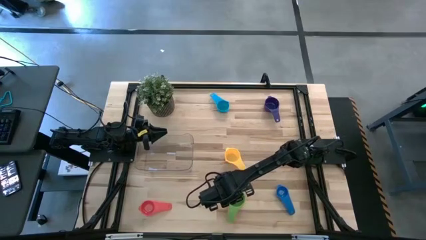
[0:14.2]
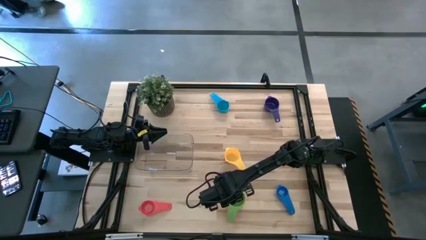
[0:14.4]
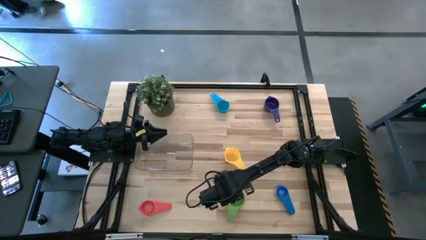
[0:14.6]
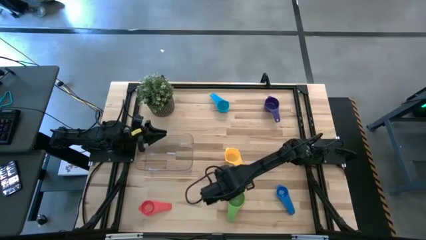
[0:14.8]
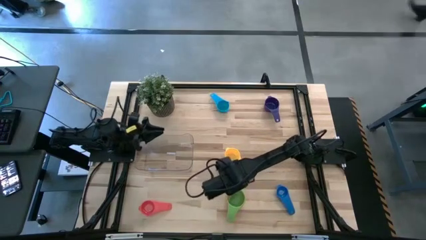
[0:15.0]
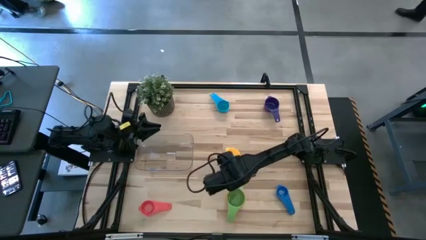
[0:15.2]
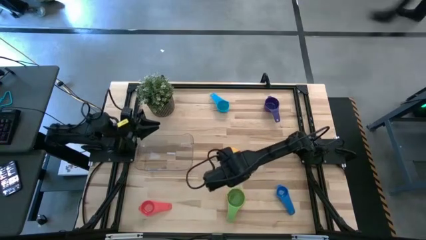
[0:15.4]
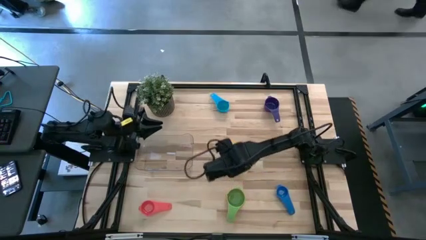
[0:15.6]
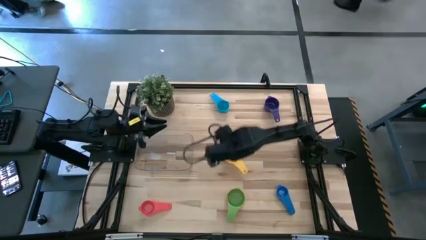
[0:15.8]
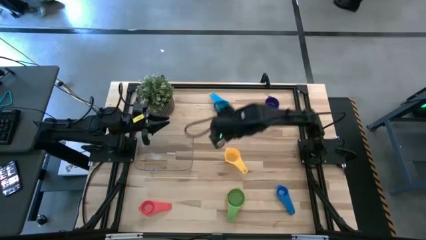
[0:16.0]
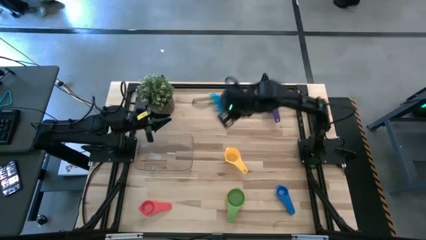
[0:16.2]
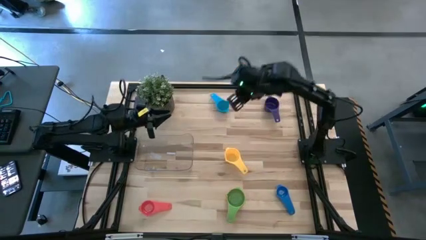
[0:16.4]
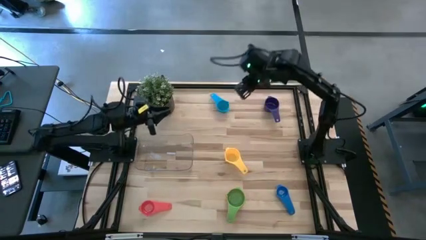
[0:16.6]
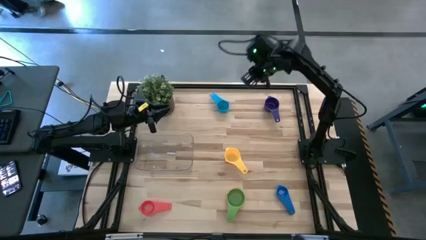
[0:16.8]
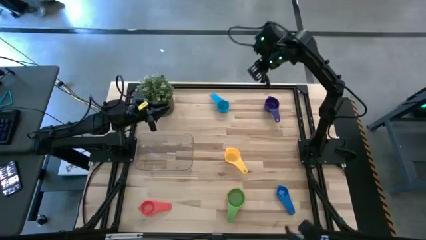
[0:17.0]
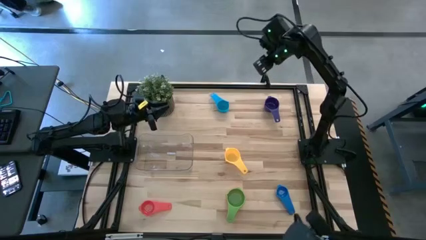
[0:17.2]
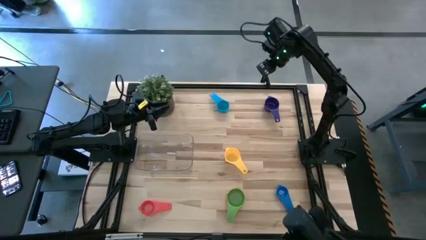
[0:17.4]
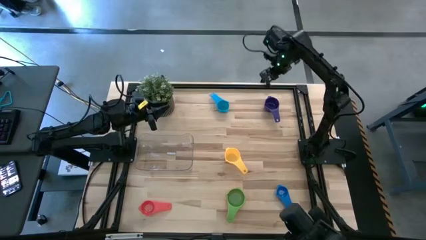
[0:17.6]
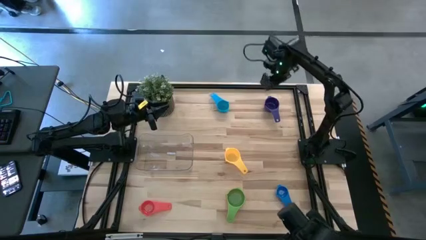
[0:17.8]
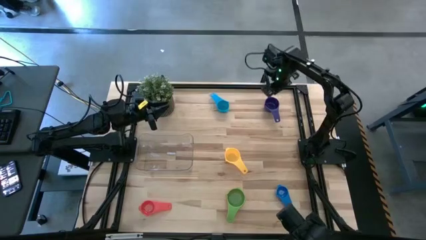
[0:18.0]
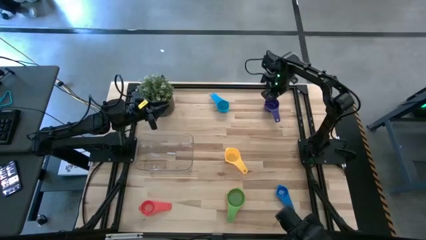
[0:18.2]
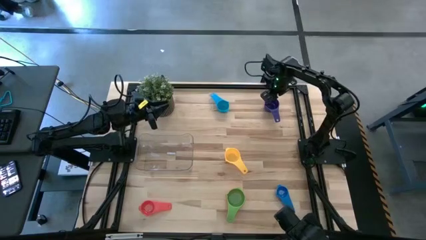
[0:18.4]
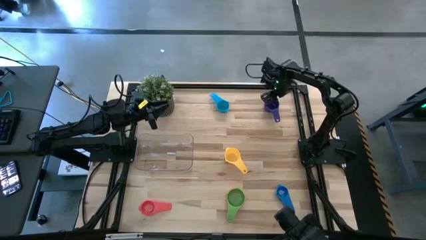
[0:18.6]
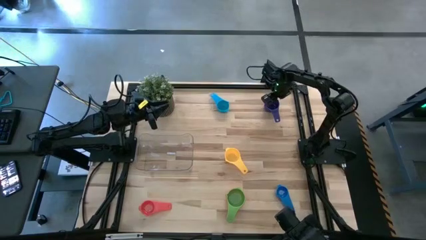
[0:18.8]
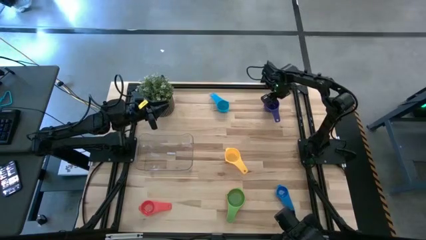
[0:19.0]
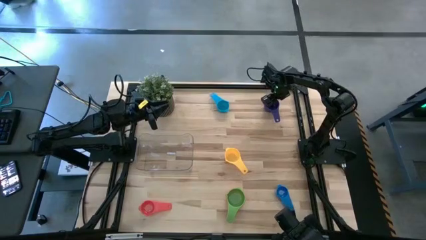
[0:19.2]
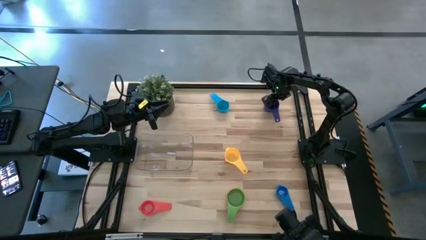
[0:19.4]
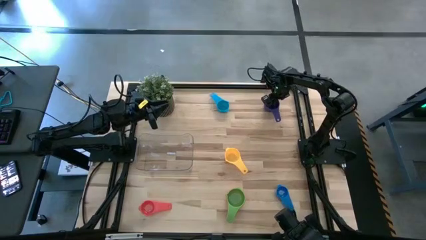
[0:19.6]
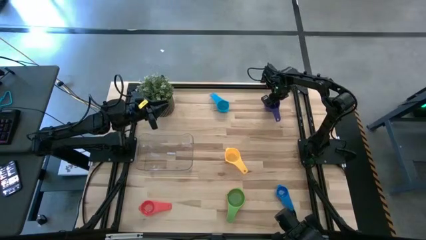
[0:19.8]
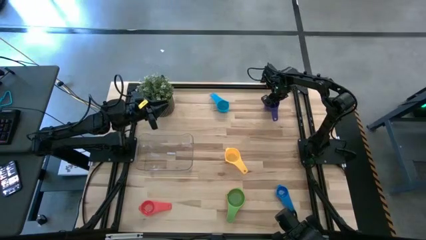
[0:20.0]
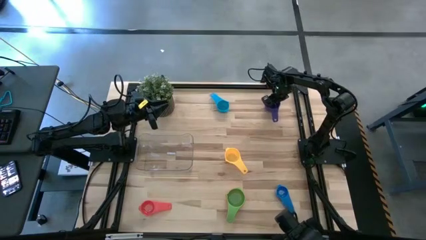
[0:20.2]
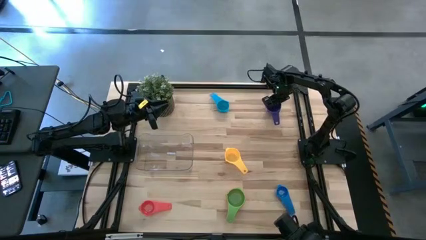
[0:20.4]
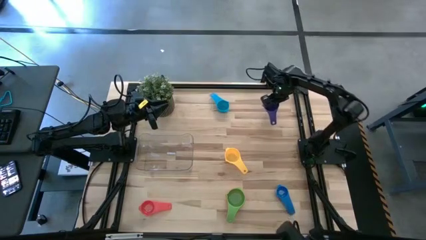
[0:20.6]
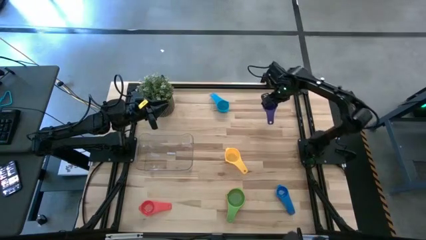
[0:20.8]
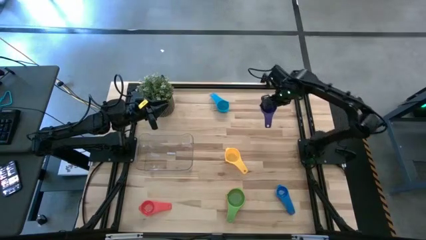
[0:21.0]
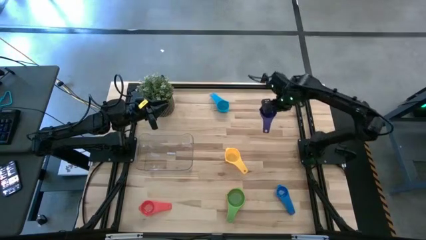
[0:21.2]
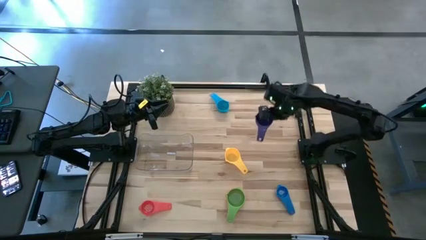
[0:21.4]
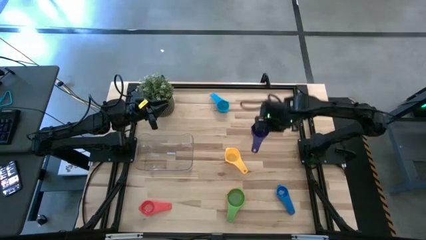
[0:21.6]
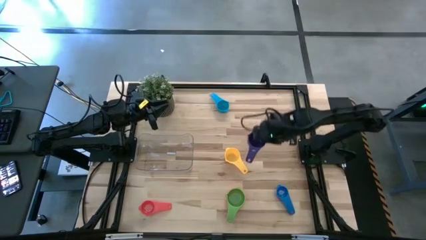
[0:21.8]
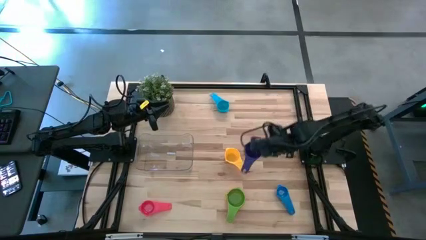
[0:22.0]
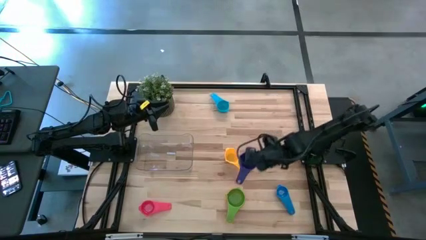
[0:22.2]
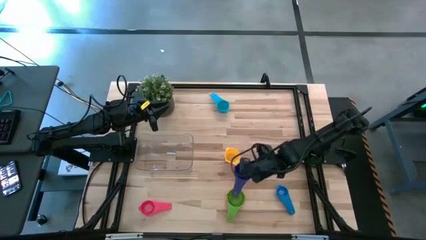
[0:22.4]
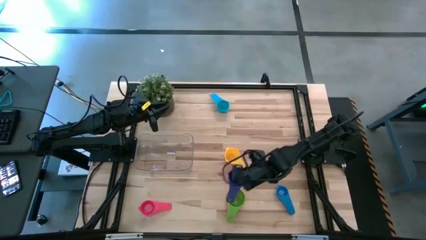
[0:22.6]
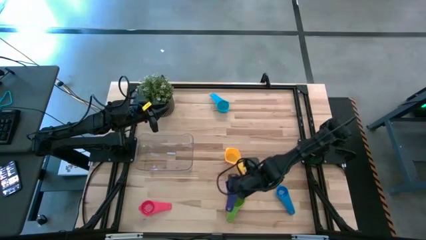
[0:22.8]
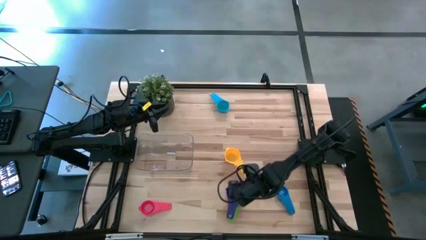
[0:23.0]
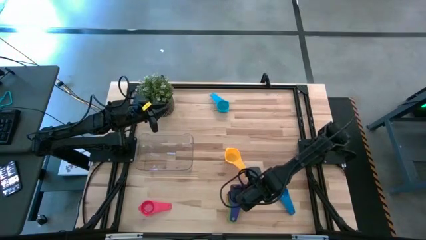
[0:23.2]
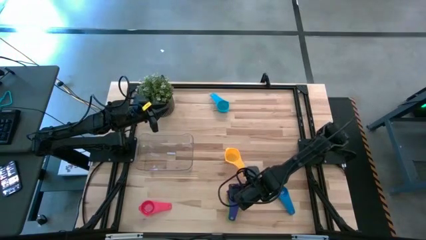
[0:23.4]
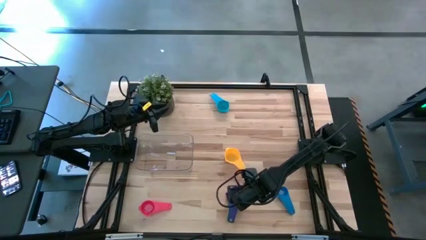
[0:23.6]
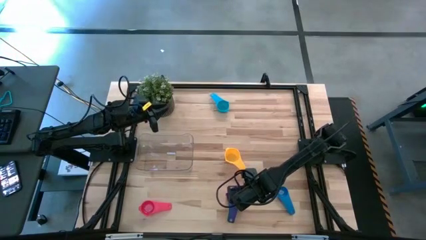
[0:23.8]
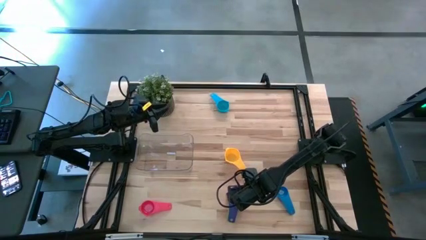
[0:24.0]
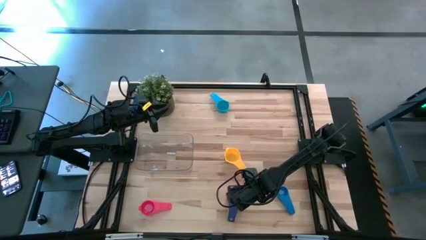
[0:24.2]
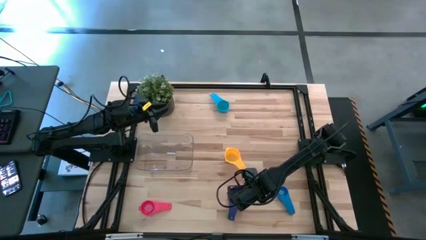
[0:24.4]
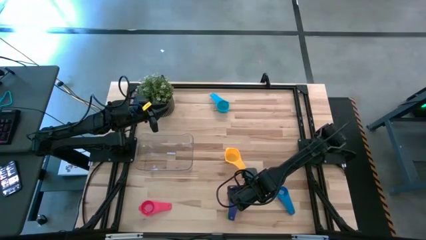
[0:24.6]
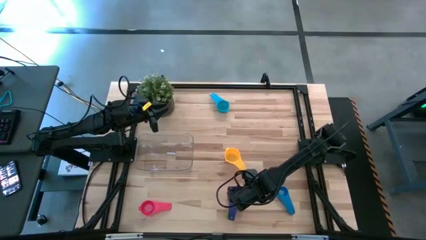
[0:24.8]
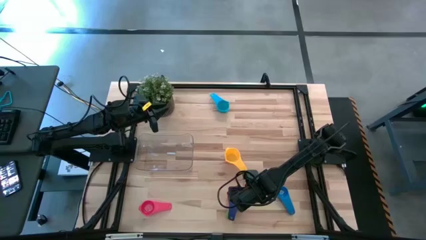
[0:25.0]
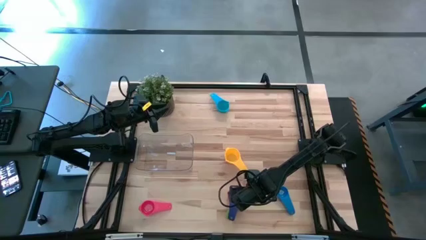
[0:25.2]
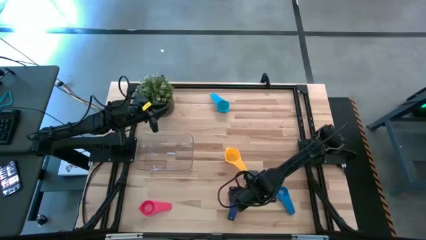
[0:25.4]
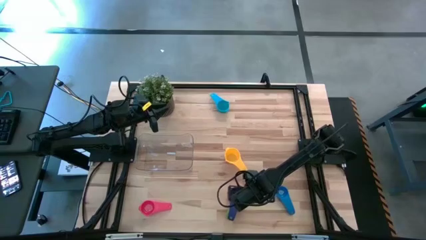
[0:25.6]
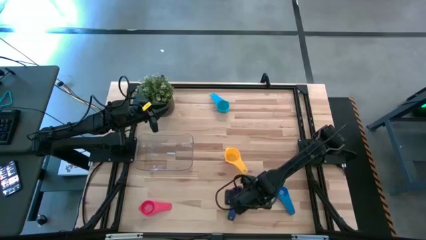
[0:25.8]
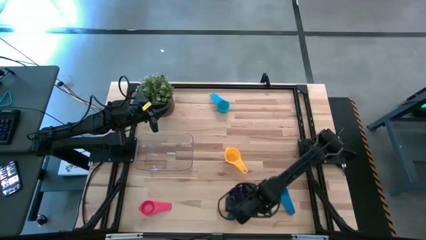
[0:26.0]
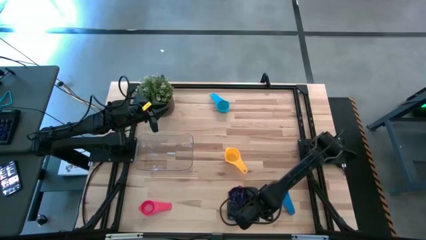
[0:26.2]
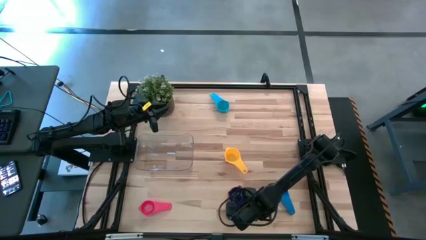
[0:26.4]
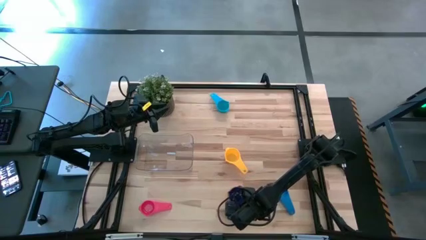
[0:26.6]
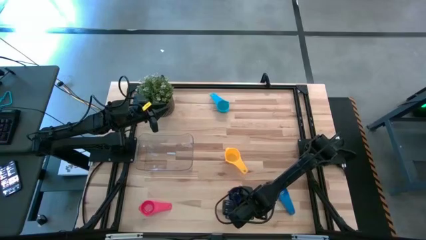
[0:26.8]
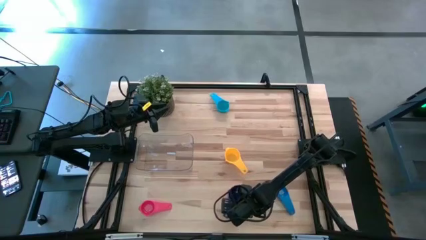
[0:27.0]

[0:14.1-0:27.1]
Task: Nest measuring cups in basket
Stack the purple measuring cup on top of the green measuring cup

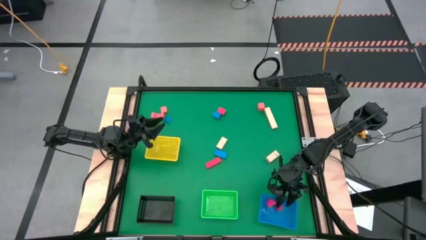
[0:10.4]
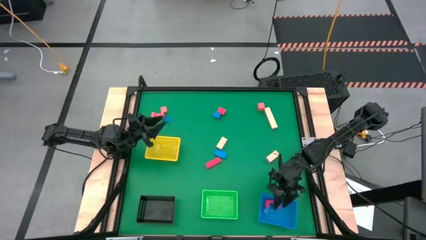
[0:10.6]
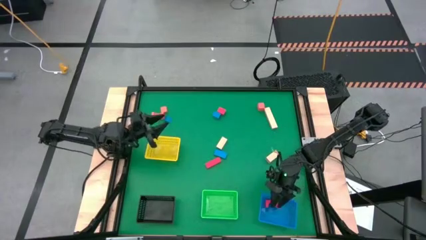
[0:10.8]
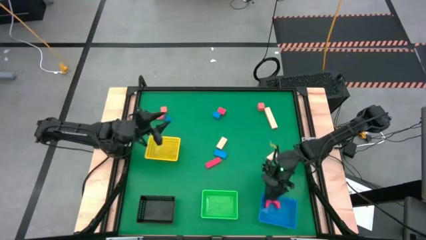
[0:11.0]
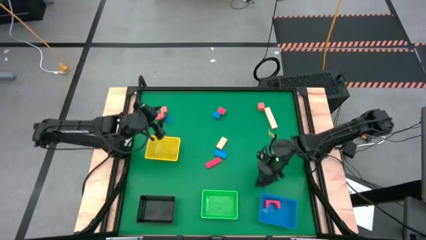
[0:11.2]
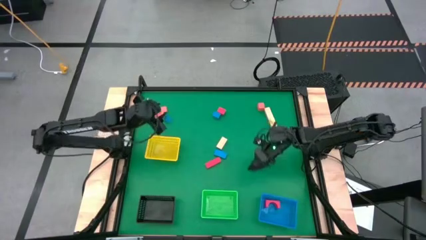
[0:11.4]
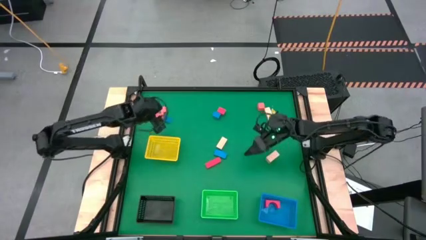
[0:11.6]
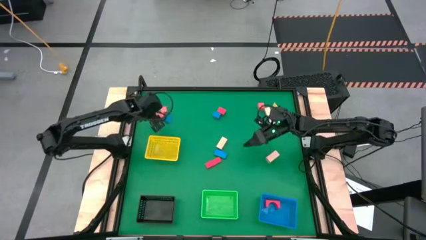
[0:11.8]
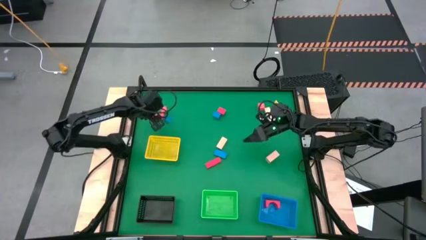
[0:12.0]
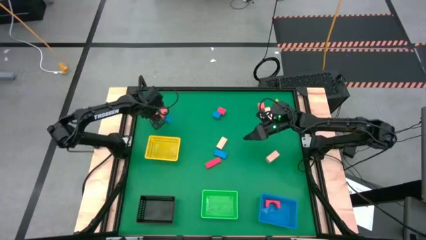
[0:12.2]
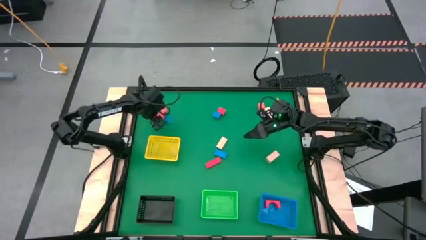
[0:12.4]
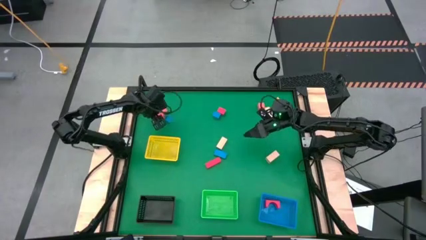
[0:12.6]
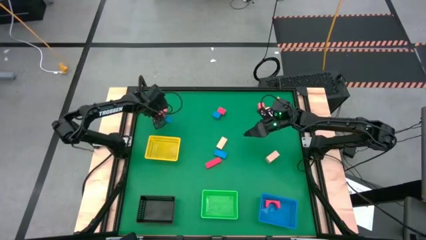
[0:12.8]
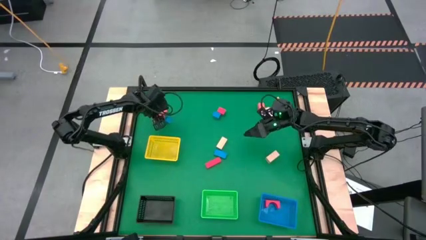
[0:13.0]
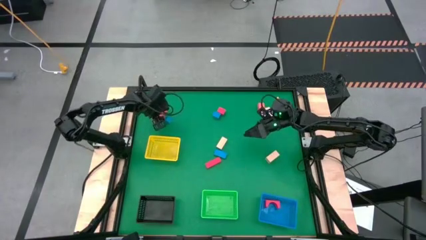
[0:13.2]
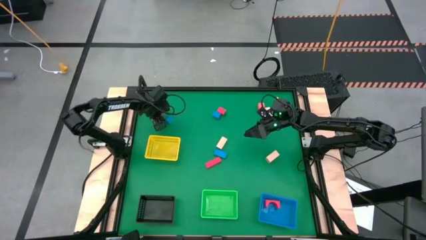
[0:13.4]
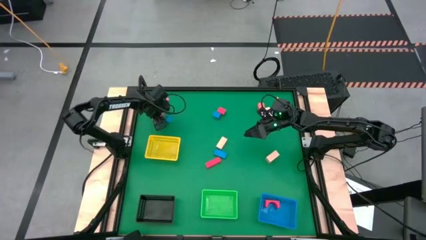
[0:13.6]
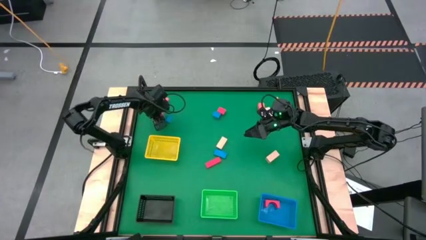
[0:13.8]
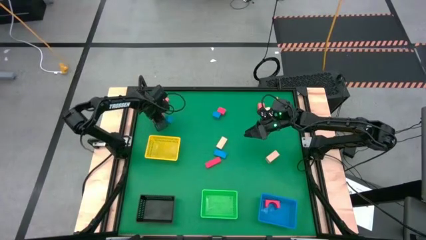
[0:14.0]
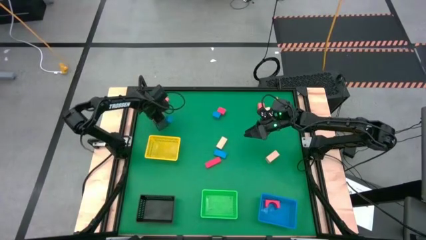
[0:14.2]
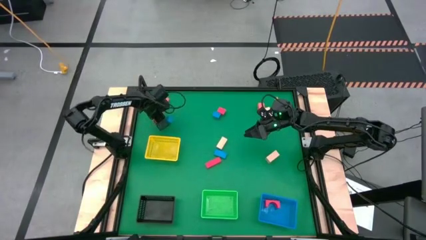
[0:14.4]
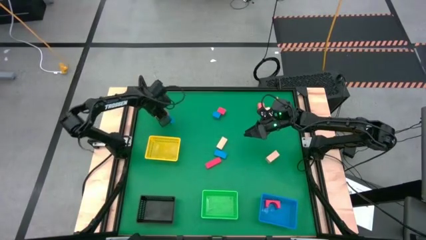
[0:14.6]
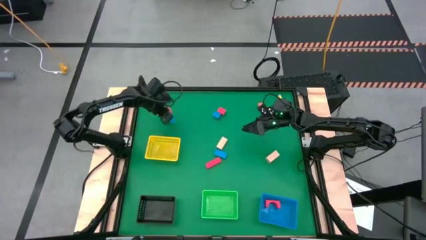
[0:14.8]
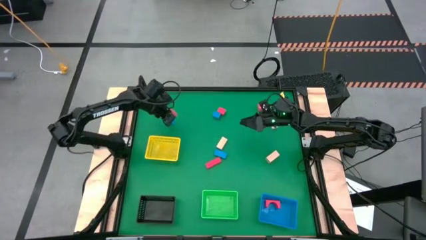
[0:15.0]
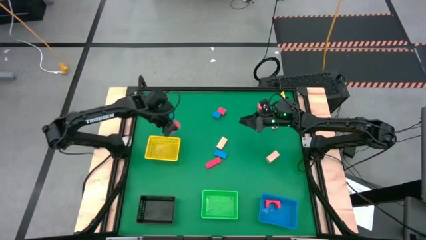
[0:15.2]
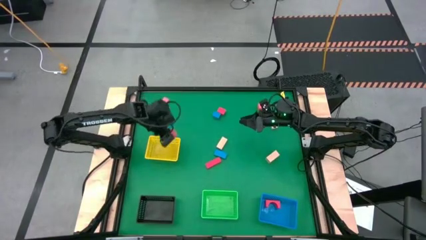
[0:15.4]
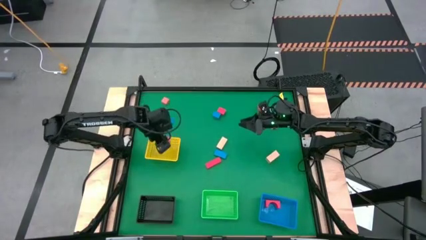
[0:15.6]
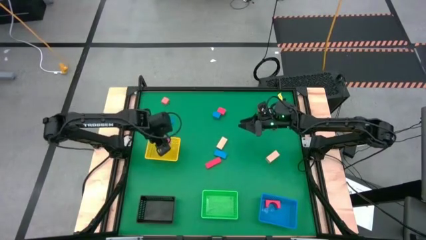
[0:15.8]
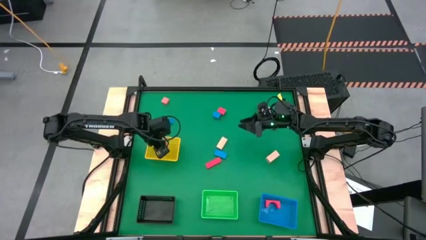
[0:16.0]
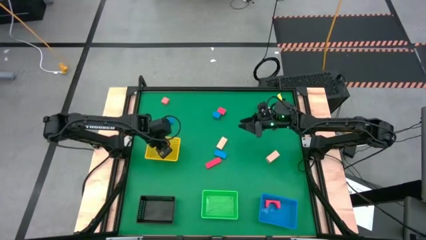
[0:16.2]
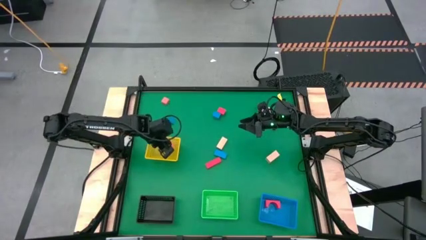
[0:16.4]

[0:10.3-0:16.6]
Task: Sort & place blocks by color
Put the orange arch block into the yellow bin
